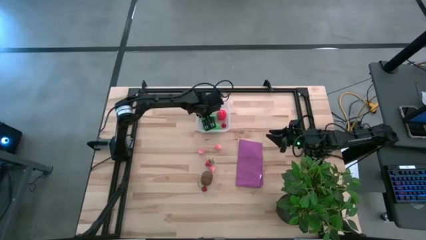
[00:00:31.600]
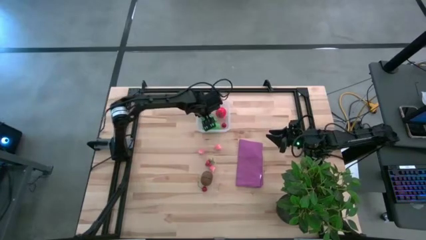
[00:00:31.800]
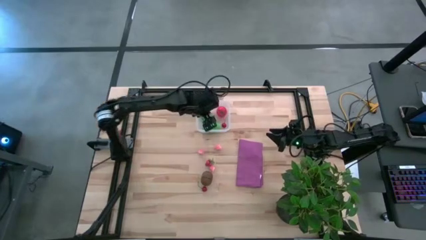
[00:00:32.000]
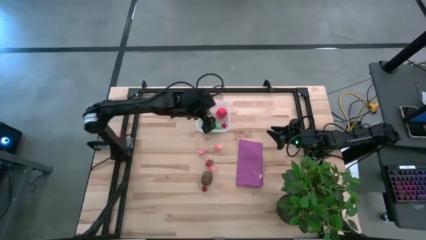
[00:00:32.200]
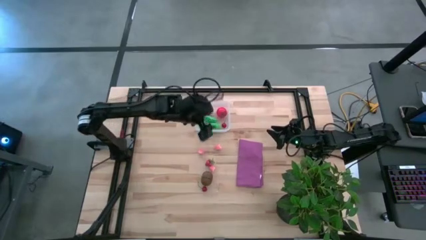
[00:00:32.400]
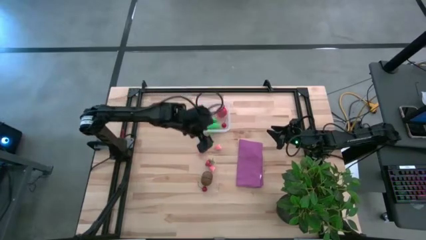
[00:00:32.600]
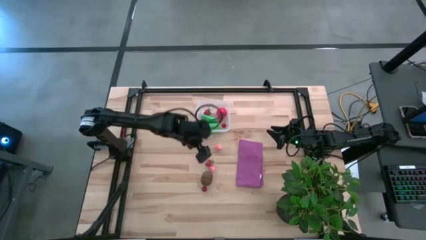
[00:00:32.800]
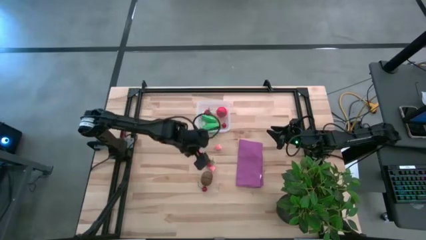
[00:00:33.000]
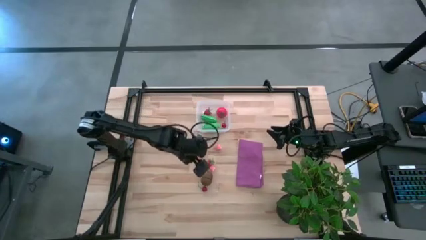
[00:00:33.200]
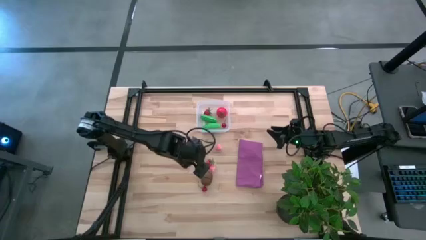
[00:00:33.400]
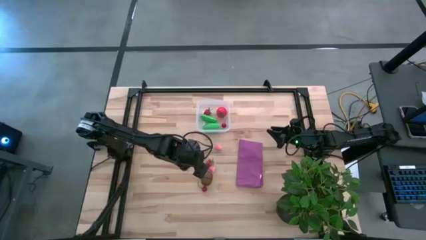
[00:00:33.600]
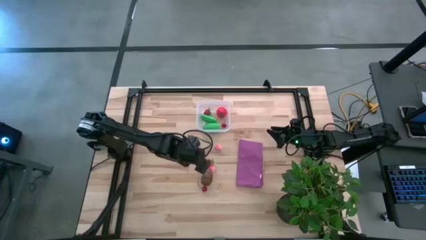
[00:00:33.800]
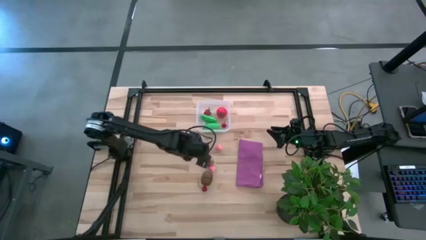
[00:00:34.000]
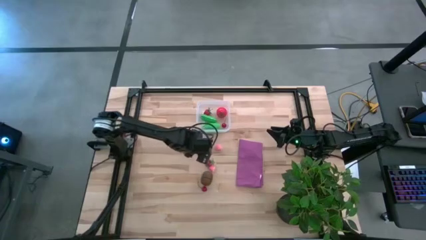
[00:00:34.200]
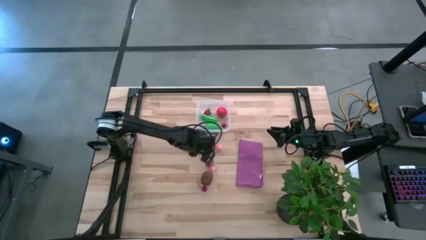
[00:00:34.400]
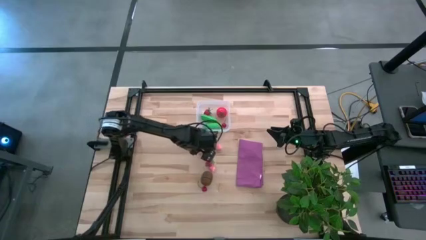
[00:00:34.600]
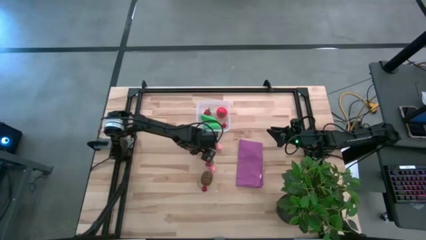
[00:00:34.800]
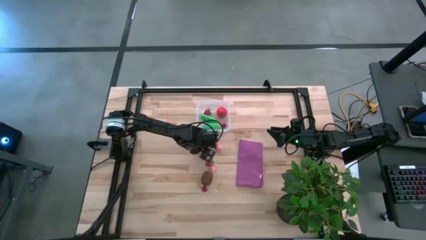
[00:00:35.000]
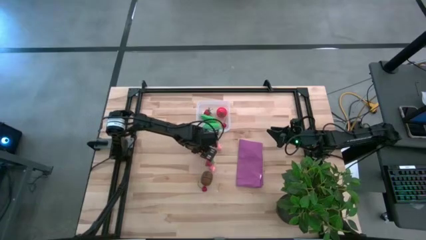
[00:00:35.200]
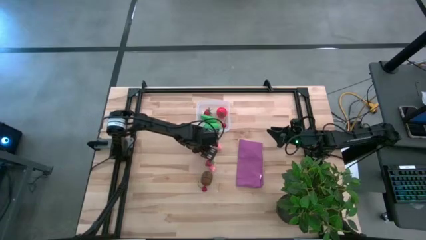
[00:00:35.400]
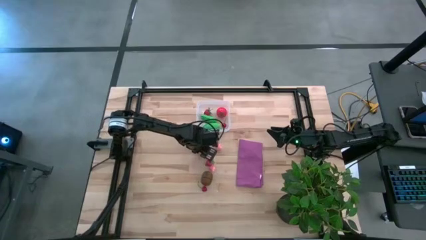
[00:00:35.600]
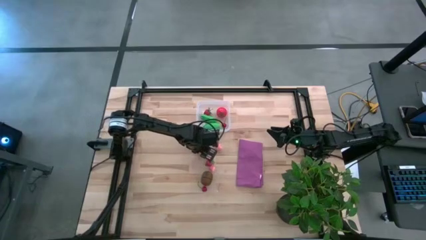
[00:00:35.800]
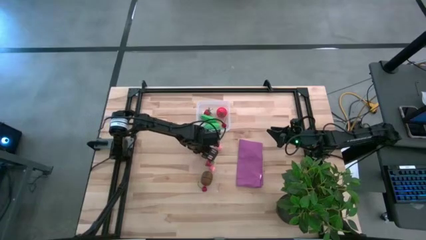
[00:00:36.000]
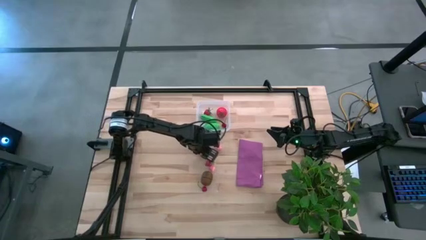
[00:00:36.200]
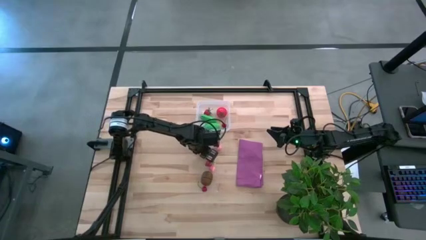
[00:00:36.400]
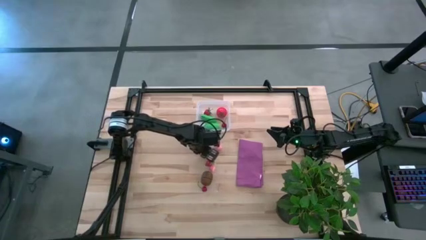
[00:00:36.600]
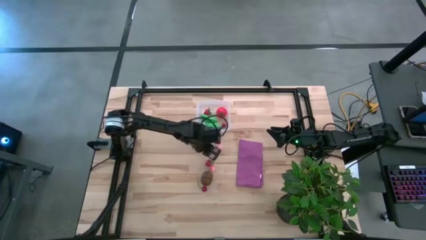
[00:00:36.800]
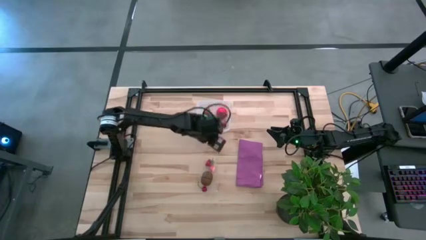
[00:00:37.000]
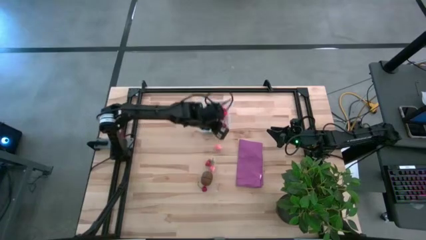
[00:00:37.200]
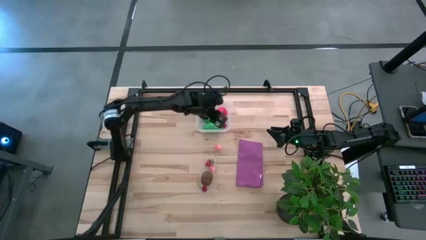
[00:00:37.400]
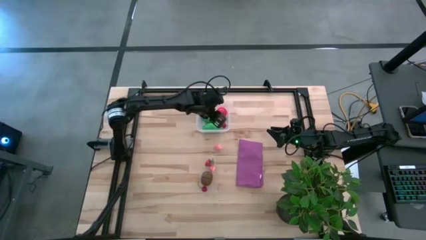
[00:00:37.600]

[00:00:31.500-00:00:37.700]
Task: Pick and placing Produce into tupperware
Put the top left pink peach into the white bin

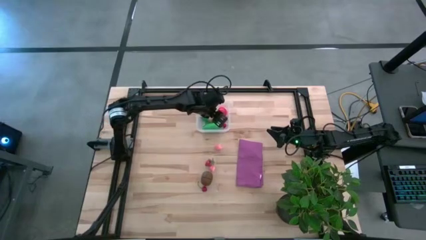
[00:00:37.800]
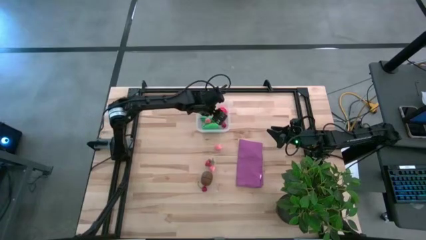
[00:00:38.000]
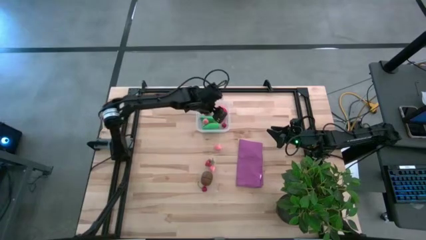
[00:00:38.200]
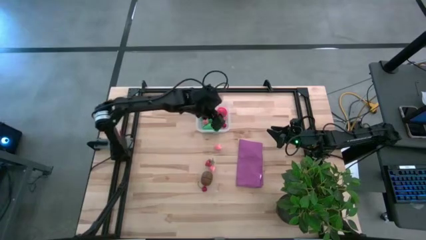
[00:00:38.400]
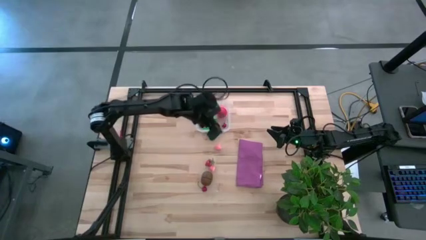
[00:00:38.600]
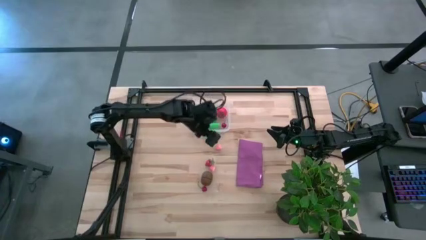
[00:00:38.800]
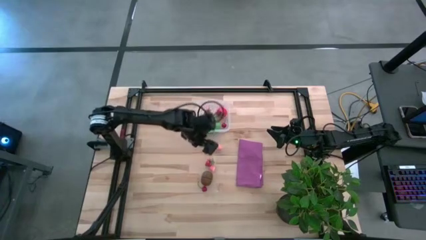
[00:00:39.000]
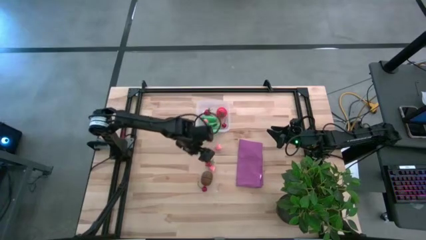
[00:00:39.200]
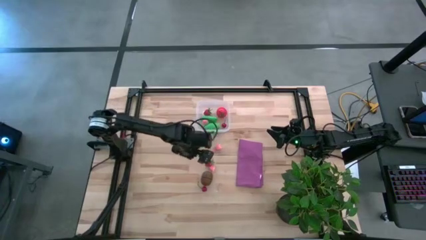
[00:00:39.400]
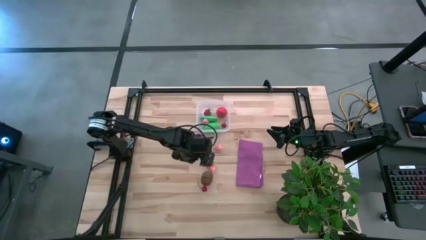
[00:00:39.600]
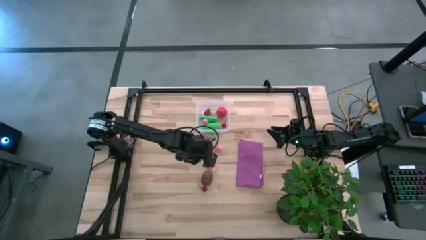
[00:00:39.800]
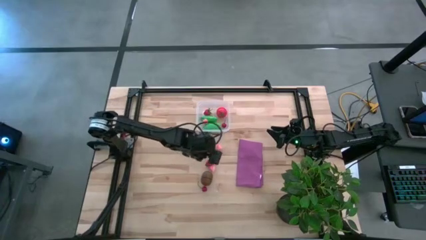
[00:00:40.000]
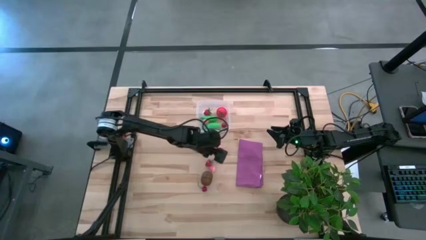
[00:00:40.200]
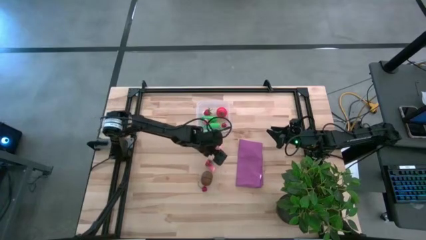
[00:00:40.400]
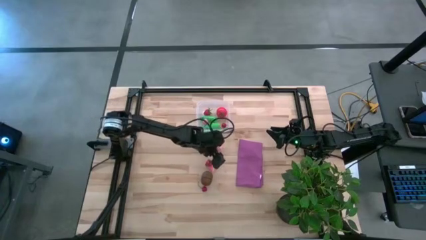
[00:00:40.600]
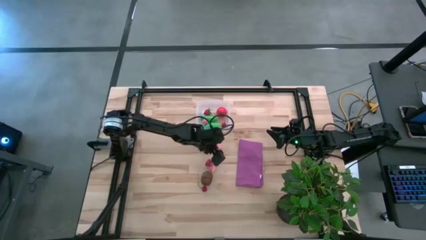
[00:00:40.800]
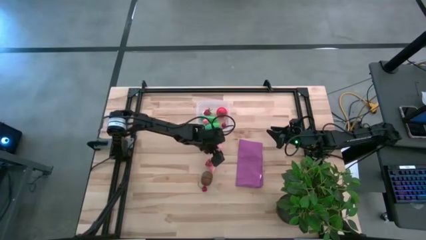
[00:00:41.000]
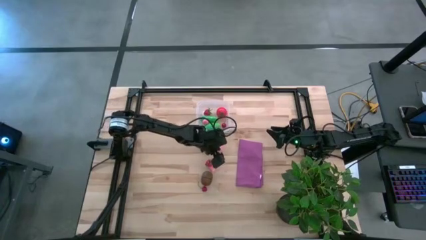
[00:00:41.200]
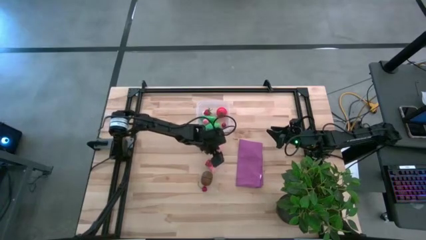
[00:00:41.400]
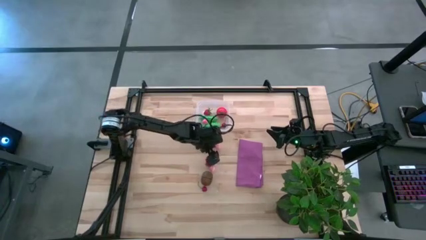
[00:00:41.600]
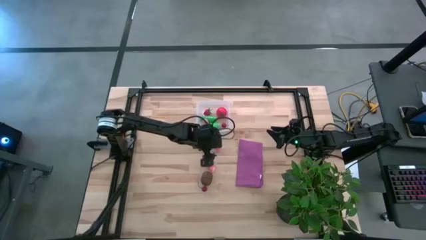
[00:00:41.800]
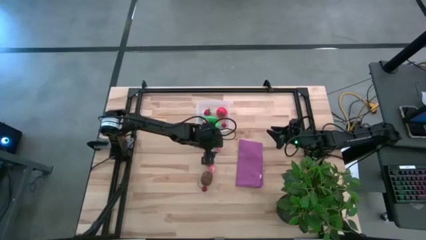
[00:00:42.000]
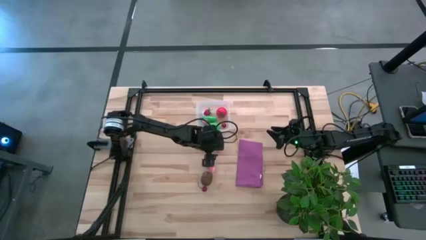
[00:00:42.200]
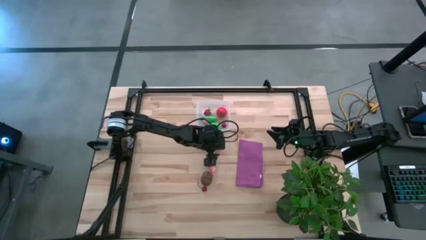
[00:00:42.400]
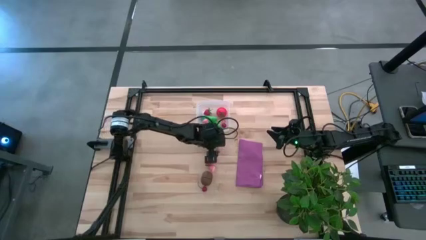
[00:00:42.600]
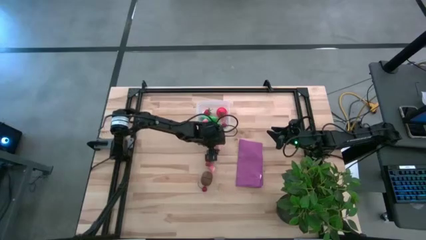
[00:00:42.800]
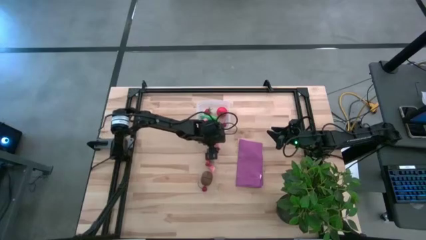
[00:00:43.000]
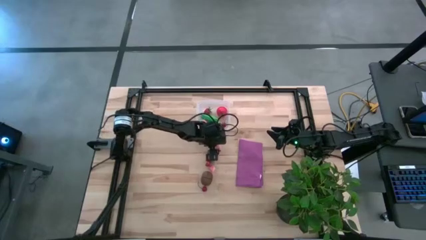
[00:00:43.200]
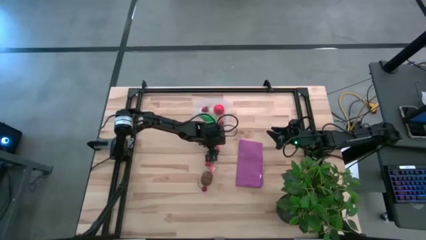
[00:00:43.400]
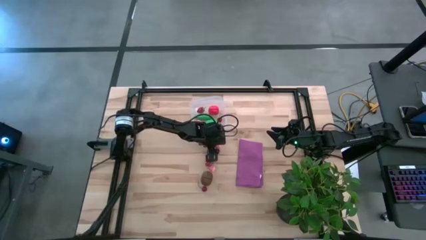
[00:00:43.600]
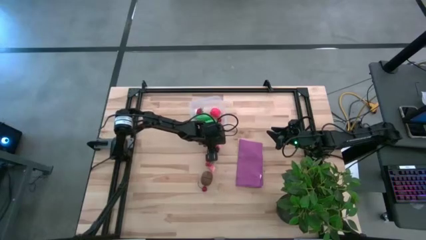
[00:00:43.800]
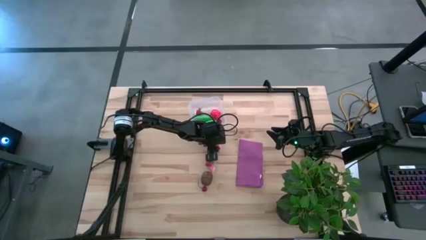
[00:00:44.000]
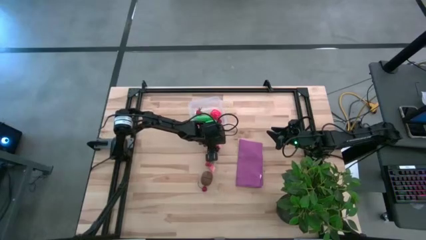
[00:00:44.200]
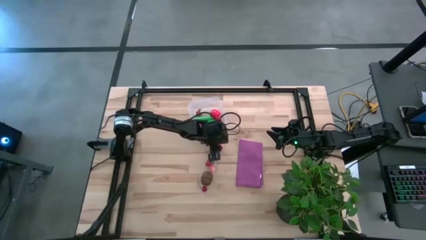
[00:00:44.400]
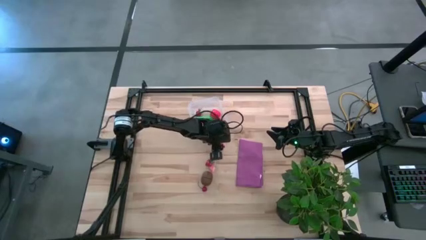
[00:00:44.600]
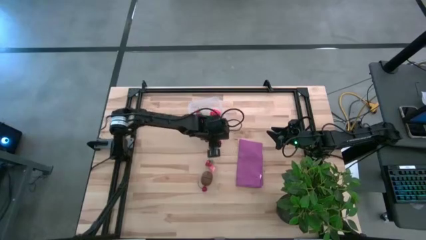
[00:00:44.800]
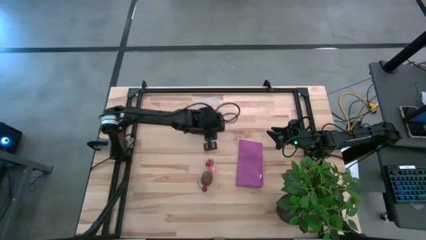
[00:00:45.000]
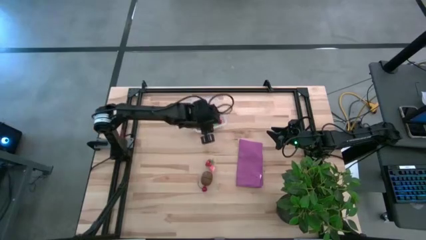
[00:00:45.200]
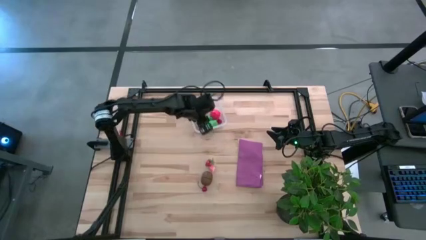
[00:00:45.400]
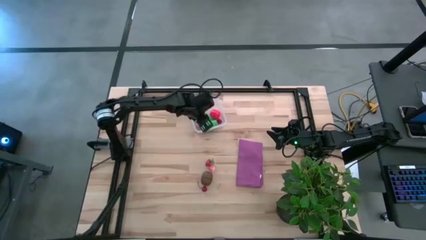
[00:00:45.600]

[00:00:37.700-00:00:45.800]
Put the top pink peach into the white bin

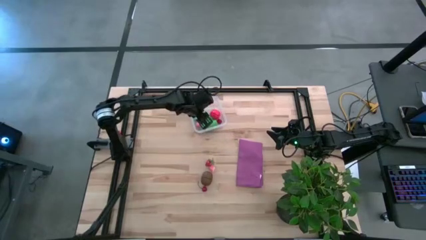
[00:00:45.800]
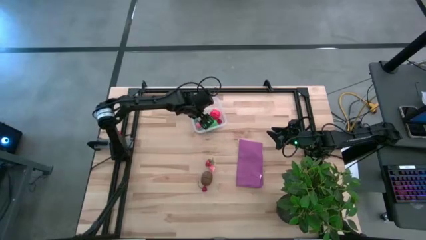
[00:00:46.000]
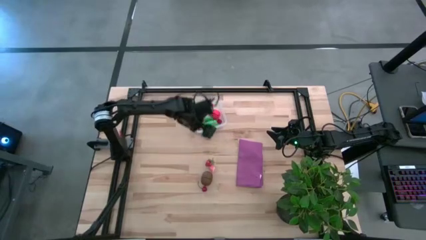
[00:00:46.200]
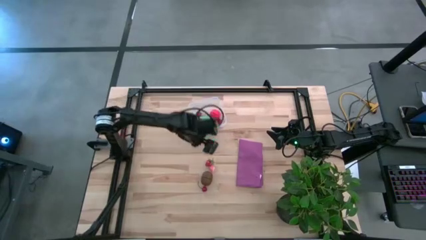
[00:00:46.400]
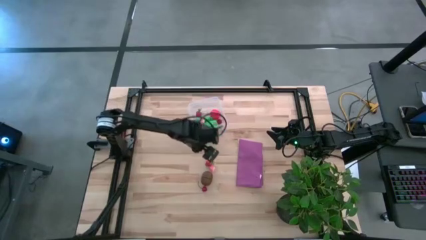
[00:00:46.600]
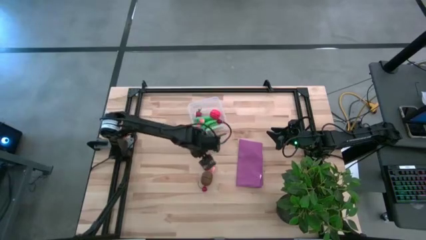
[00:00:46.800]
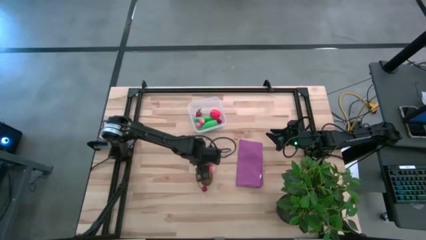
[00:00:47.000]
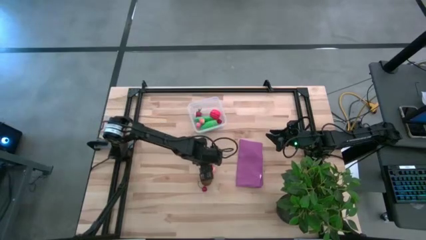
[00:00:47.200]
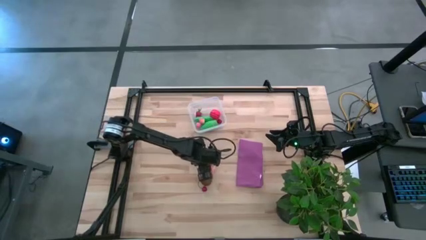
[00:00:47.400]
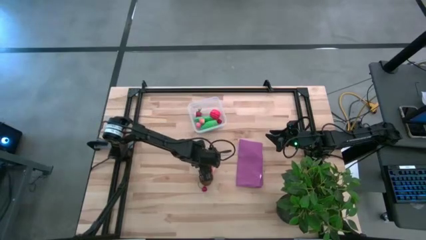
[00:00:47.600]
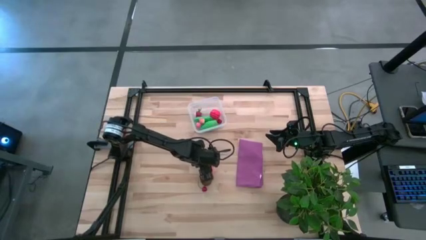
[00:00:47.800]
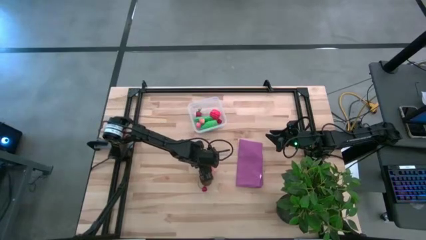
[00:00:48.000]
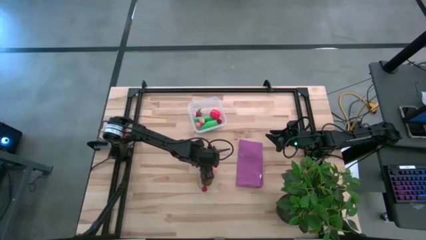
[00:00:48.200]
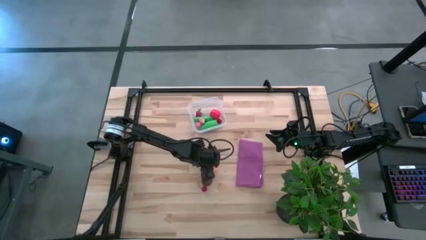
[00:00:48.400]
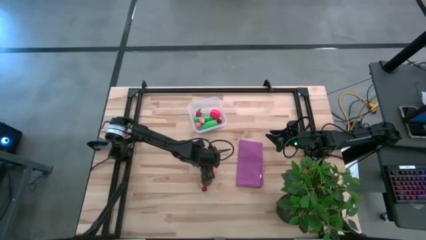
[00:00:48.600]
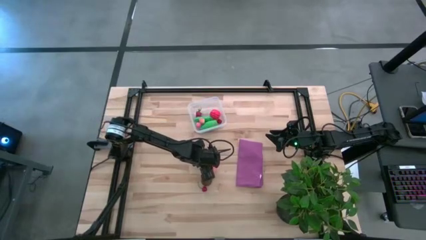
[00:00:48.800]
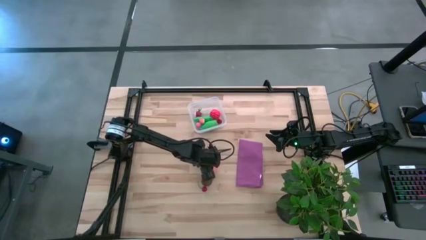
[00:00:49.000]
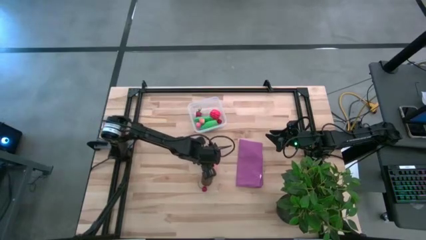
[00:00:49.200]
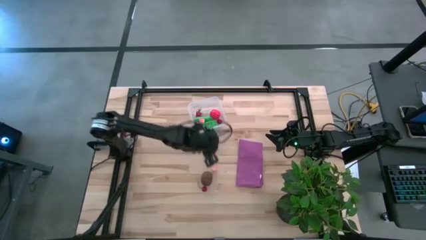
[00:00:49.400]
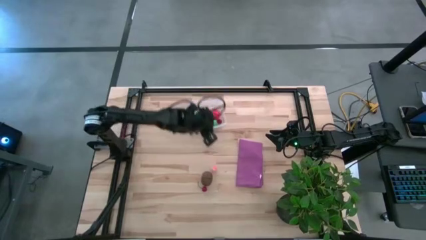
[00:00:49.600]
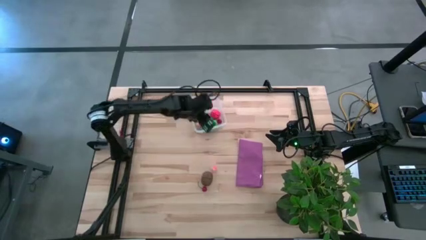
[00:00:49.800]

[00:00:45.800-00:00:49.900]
Put the red strawberry into the white bin
